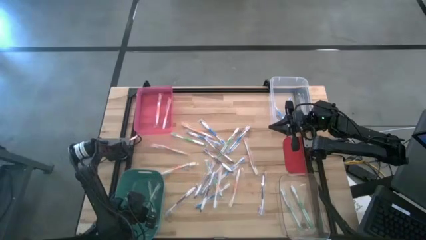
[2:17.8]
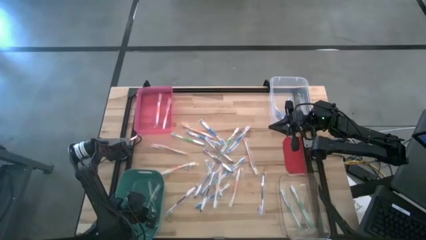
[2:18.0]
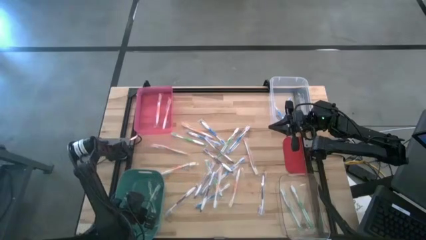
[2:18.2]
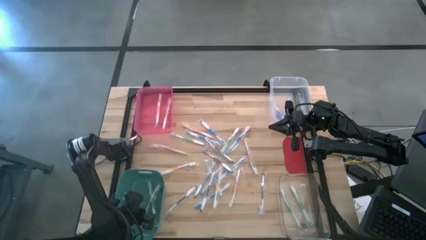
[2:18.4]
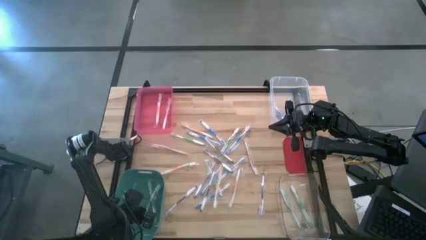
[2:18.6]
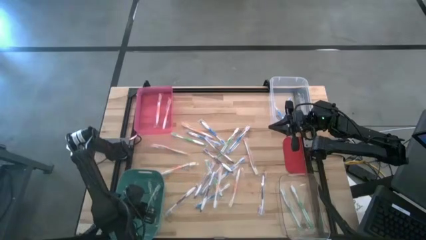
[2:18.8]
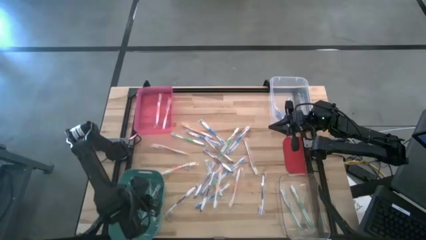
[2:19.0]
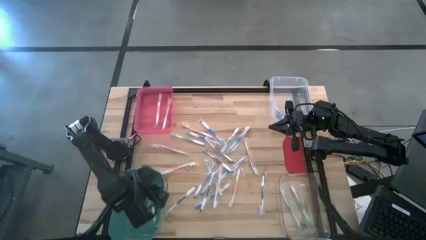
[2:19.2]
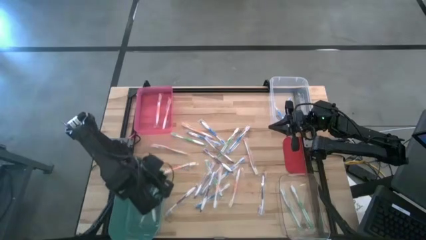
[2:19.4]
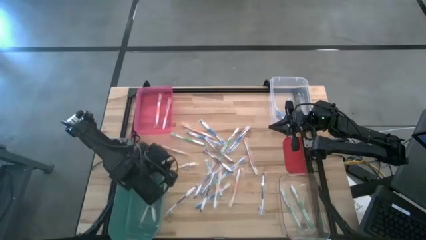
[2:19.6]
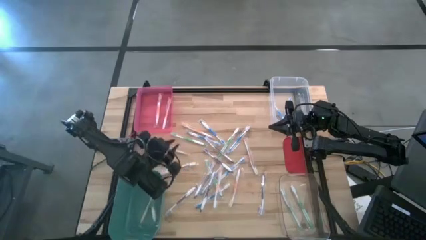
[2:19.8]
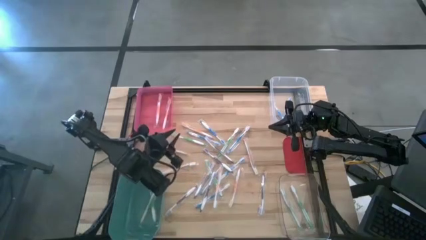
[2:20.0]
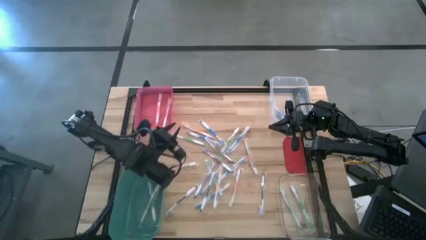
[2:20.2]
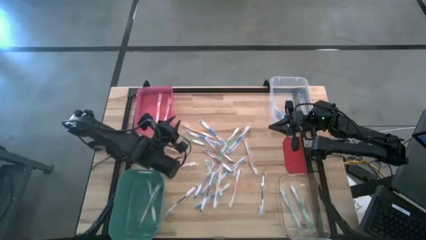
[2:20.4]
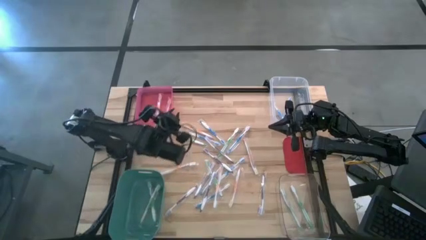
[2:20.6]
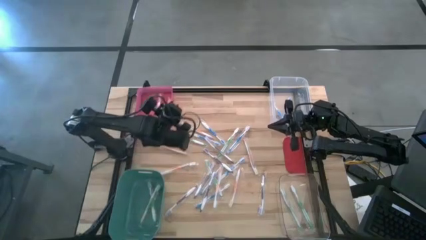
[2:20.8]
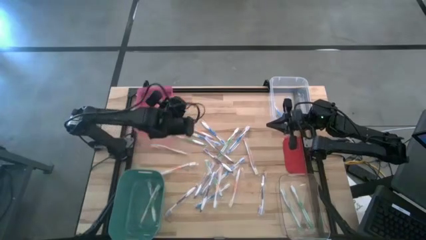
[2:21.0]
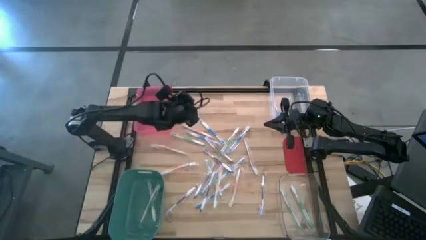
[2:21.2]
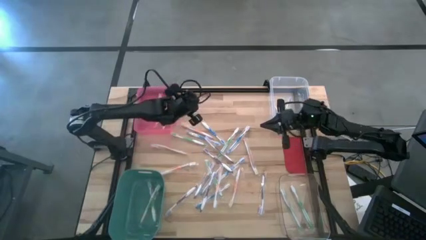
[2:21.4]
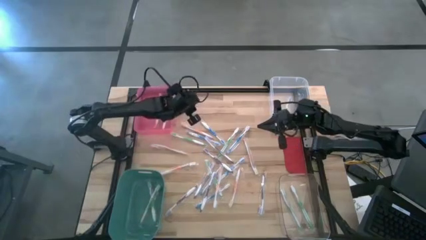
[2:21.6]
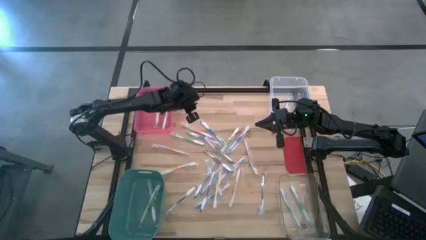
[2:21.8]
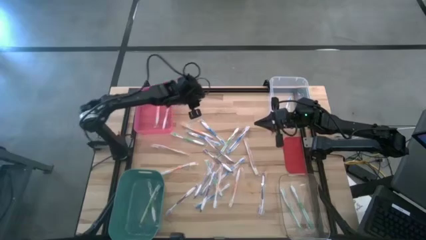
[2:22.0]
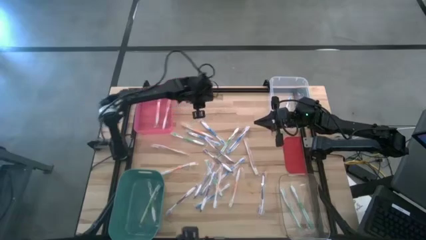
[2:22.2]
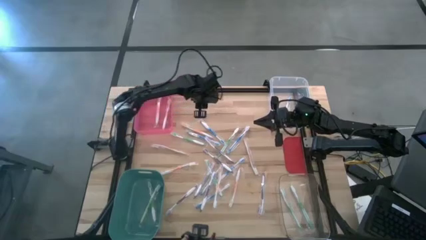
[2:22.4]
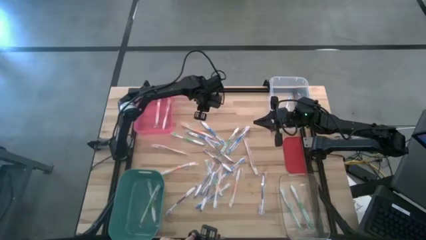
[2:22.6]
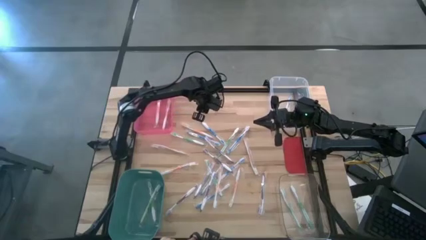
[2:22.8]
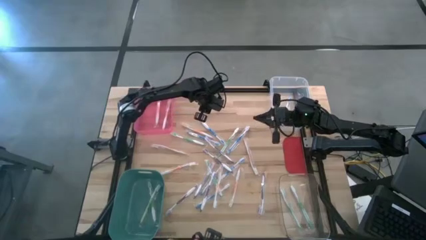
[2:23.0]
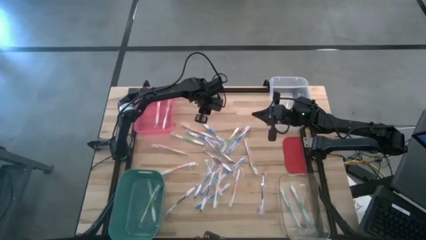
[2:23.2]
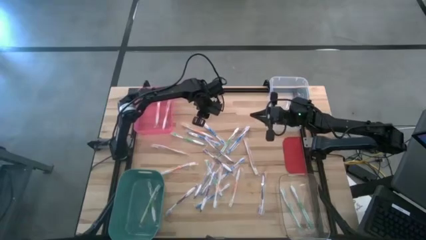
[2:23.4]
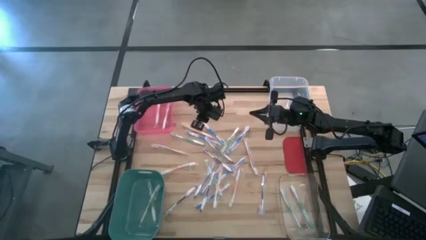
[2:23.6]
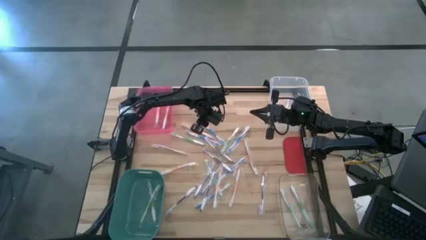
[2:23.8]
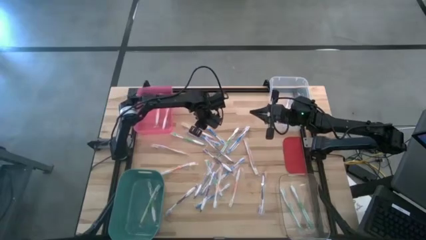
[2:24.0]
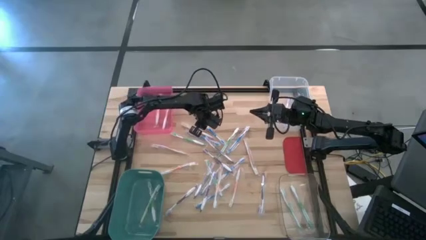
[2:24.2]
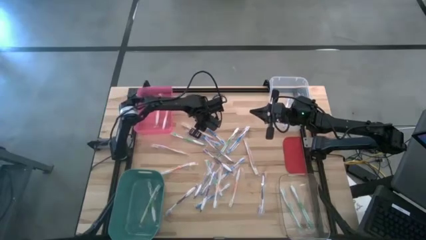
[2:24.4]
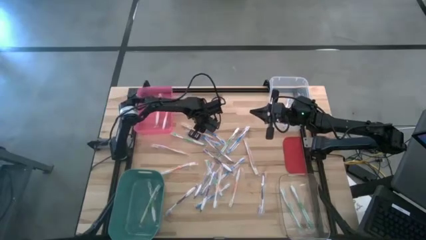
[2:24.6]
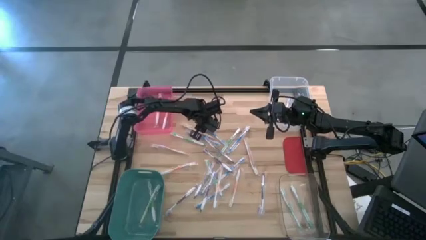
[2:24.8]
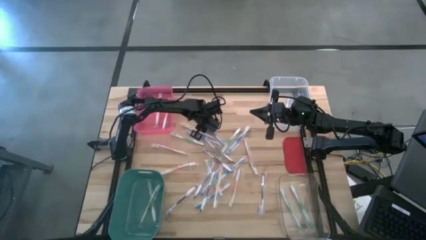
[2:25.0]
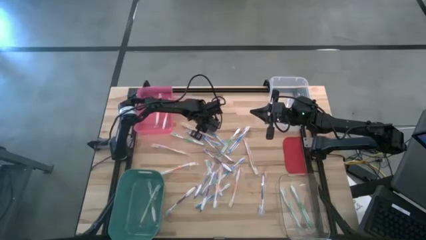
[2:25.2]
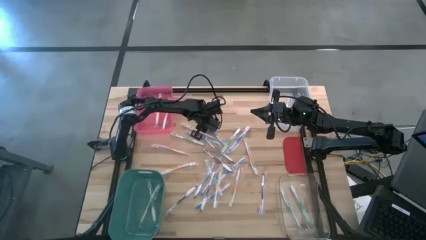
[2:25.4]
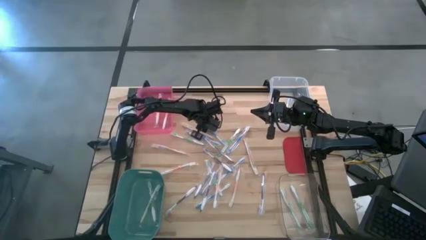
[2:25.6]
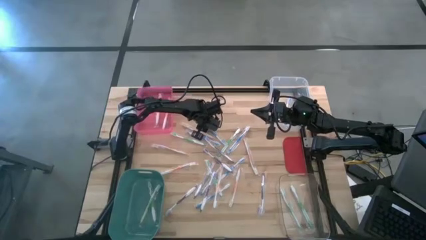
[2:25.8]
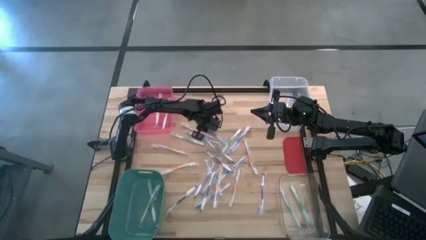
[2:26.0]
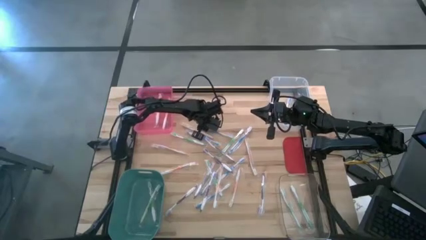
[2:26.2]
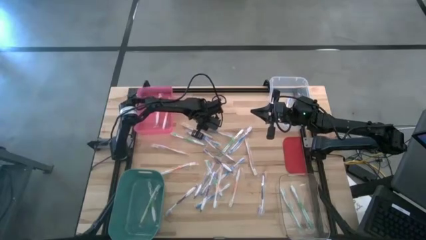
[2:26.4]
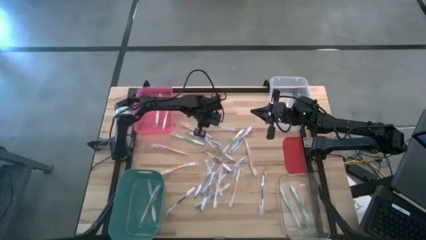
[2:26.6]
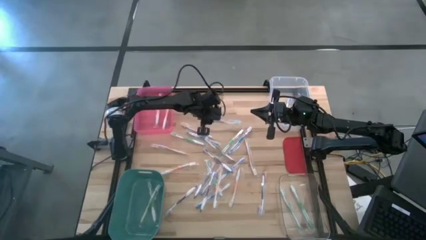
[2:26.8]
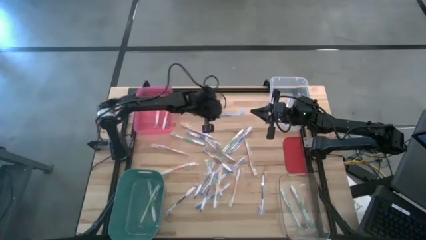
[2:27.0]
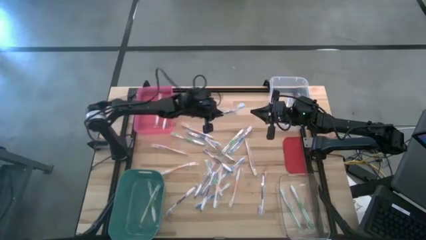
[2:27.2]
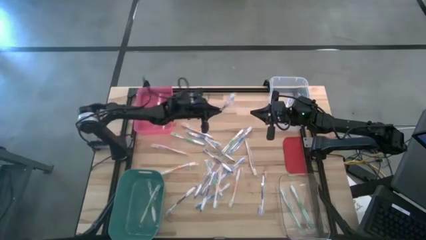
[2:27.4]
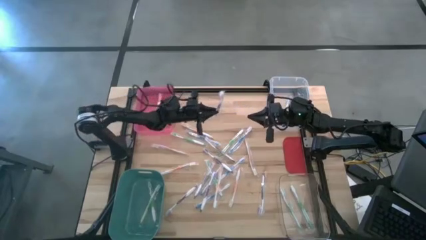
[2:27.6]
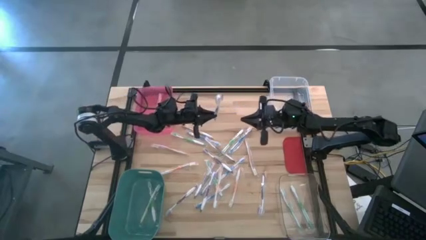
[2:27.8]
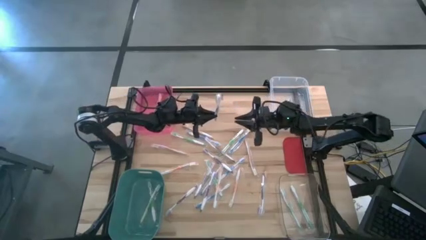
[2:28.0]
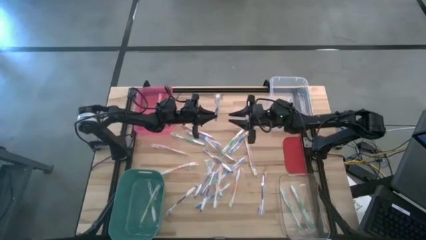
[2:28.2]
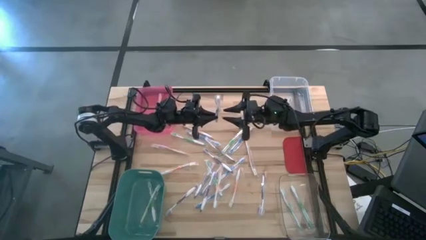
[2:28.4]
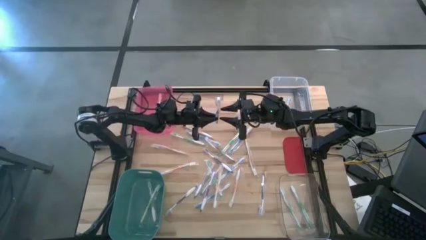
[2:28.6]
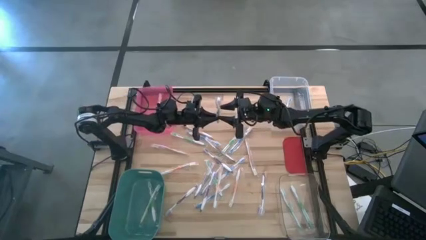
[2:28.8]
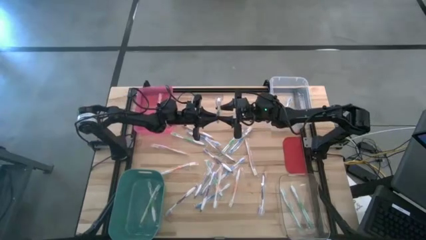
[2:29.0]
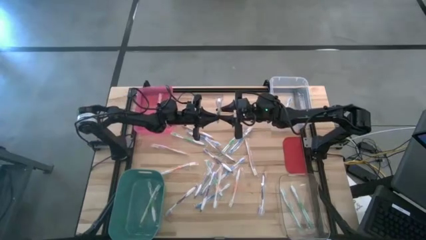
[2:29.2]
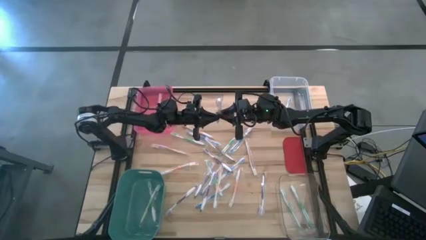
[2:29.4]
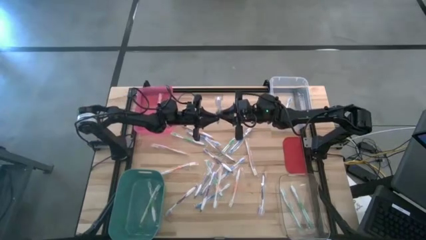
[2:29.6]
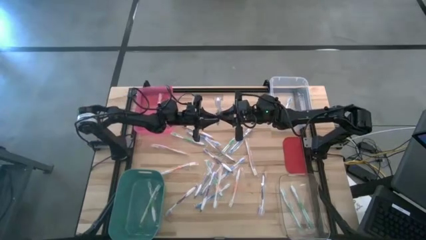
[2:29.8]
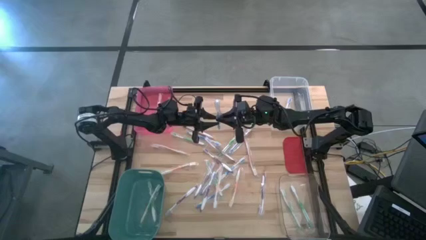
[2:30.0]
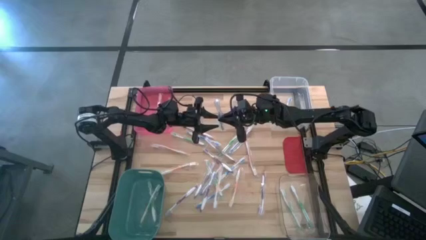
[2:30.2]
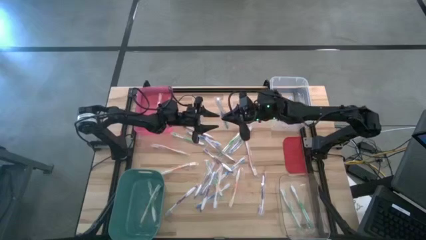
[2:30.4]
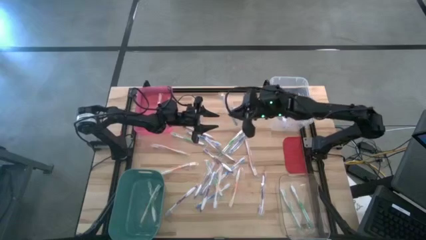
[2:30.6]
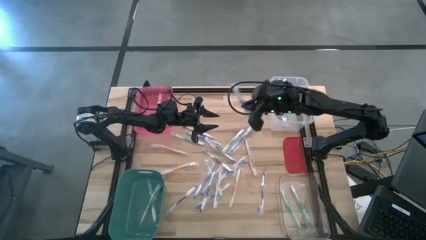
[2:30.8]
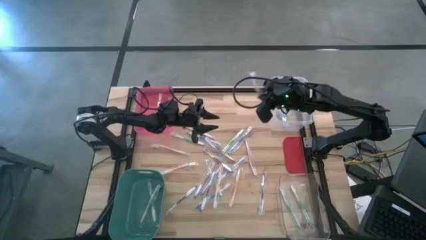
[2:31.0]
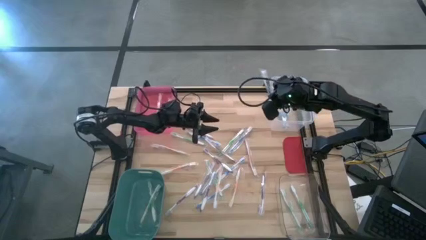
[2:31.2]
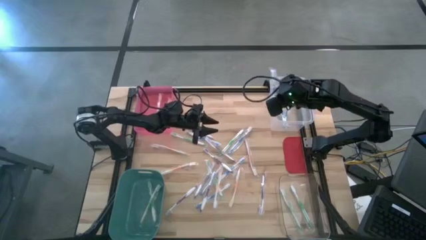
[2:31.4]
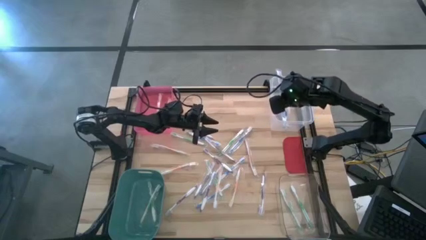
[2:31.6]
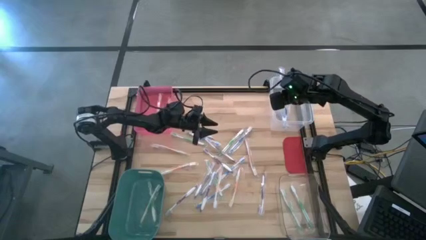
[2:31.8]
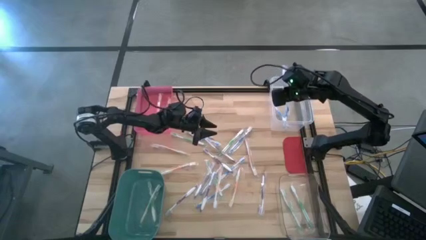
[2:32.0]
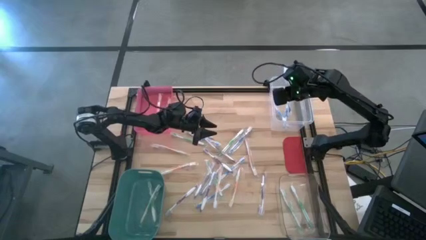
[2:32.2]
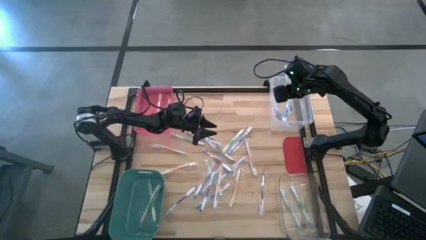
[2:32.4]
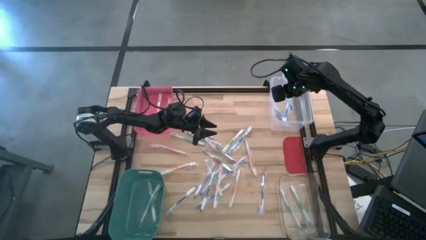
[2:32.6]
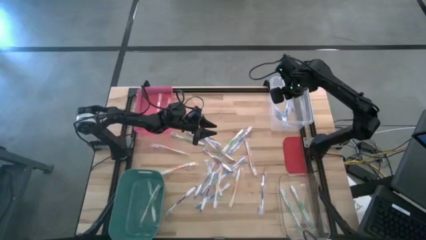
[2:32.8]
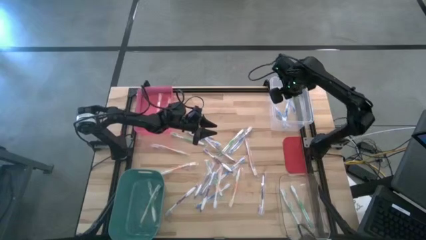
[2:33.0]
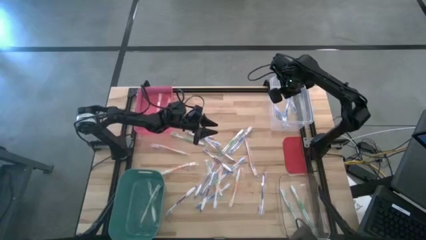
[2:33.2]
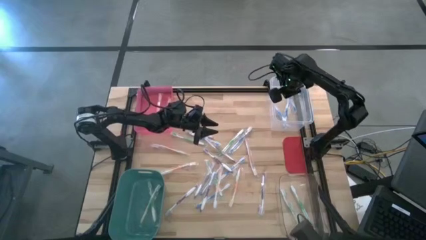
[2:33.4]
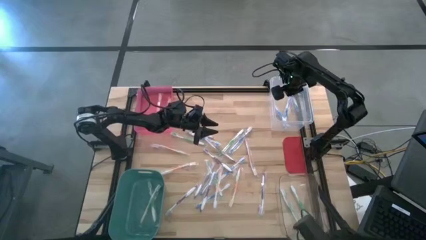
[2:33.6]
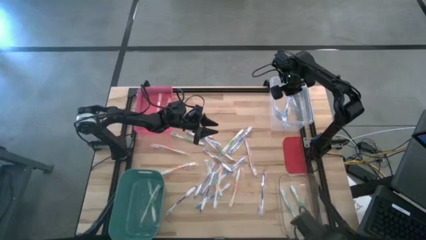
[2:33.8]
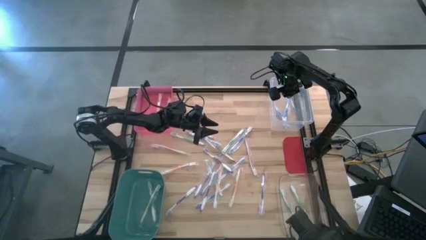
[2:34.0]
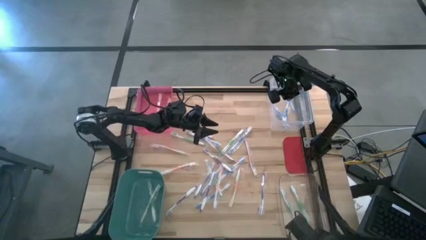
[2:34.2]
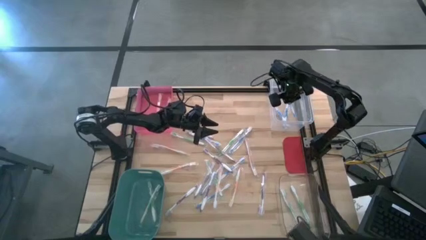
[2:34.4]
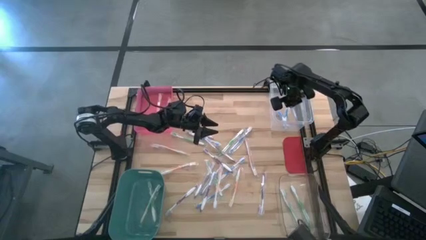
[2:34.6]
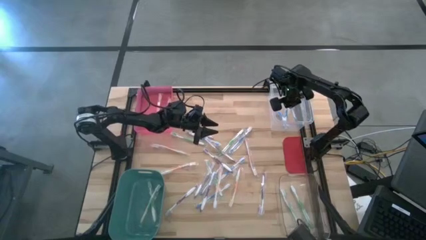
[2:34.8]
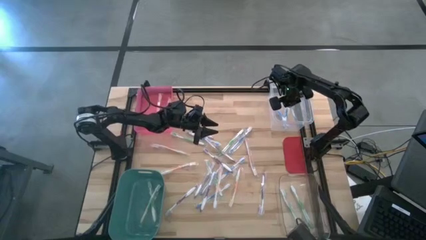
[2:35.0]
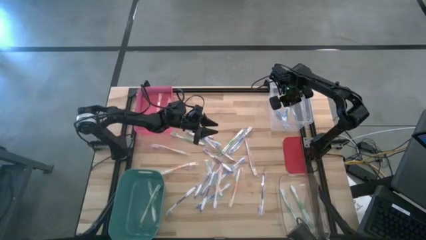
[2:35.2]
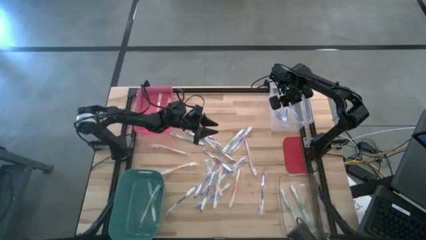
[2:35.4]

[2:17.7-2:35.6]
Task: Pick & Place Toothbrushes
Put the blue toothbrush into the top transparent bin
